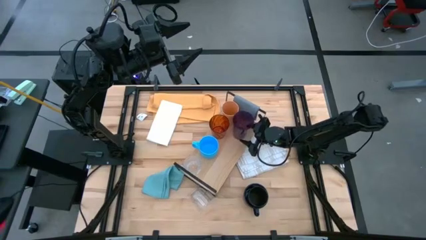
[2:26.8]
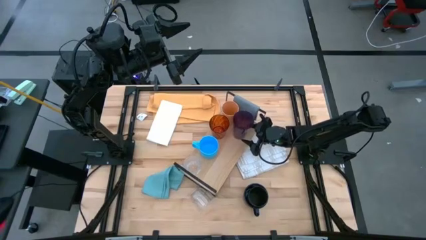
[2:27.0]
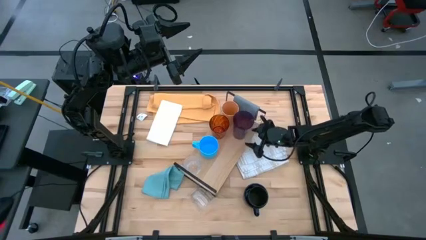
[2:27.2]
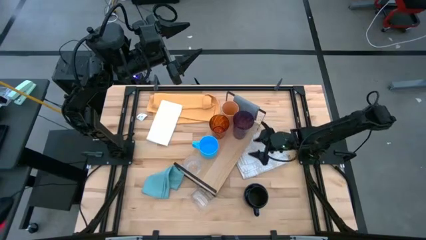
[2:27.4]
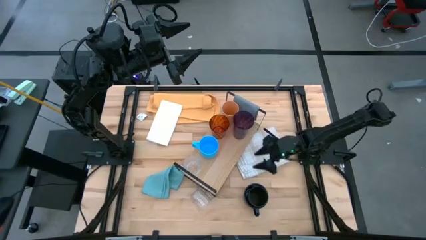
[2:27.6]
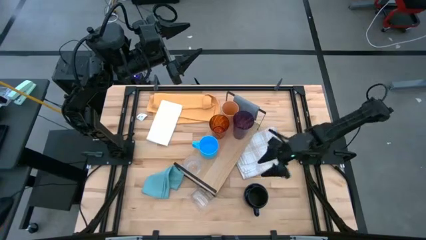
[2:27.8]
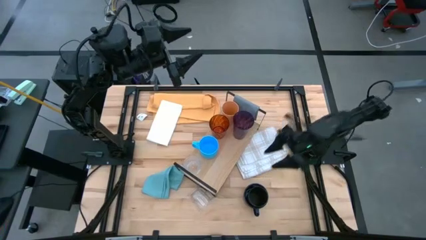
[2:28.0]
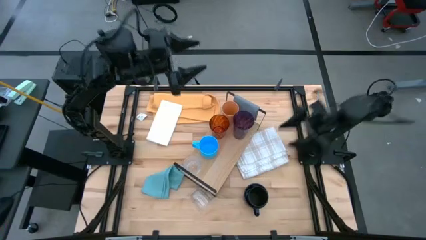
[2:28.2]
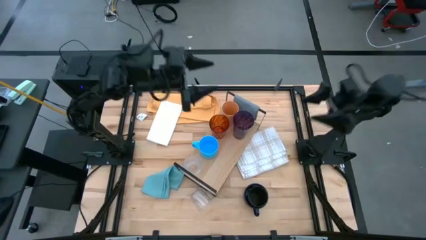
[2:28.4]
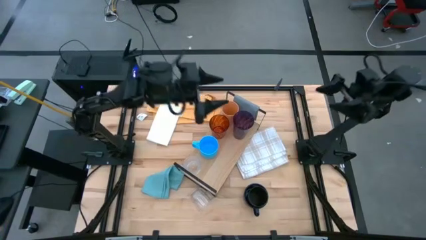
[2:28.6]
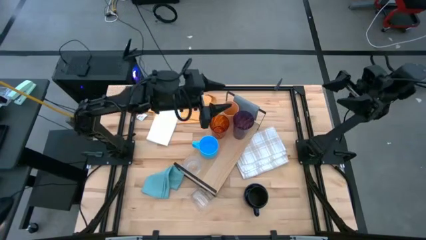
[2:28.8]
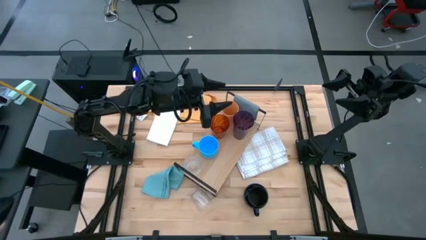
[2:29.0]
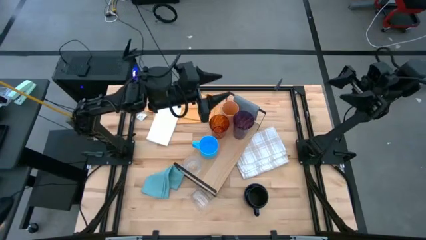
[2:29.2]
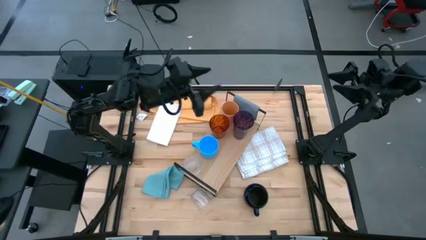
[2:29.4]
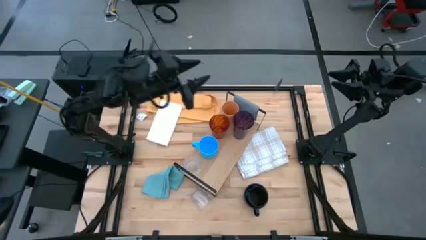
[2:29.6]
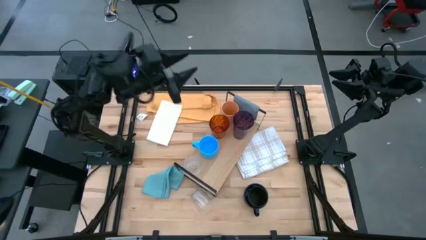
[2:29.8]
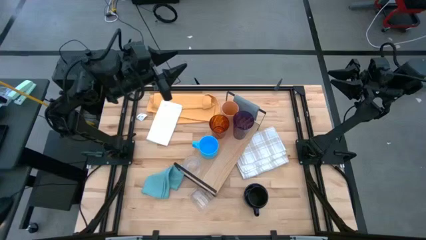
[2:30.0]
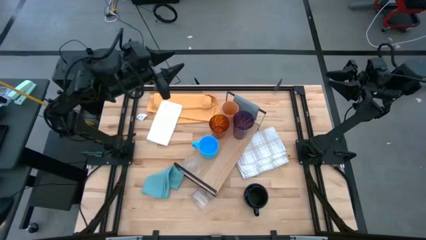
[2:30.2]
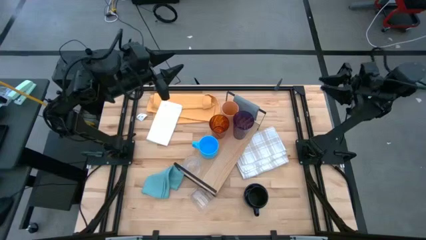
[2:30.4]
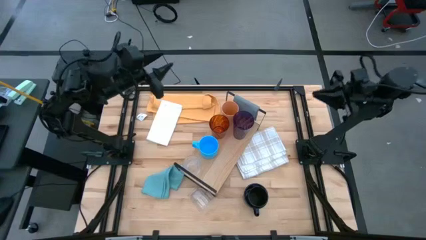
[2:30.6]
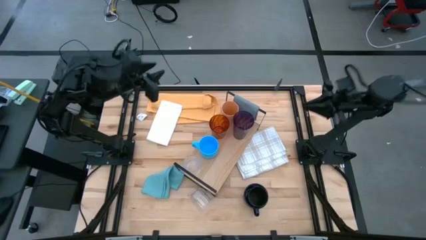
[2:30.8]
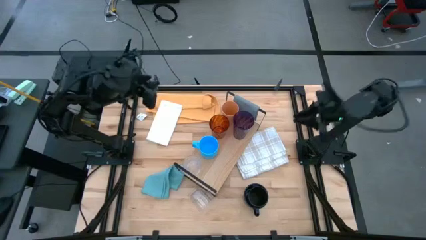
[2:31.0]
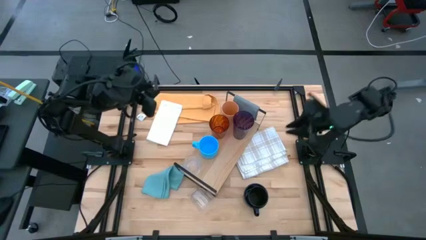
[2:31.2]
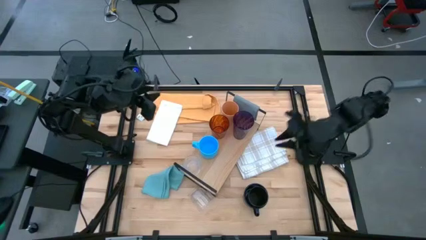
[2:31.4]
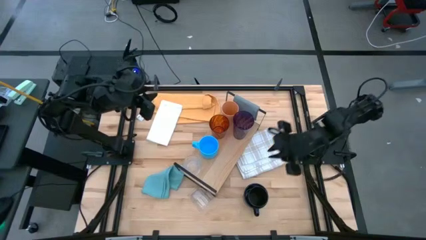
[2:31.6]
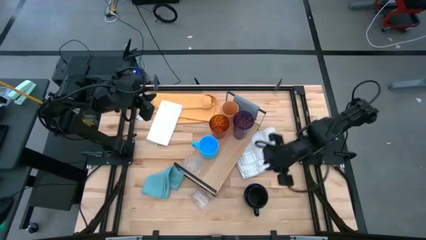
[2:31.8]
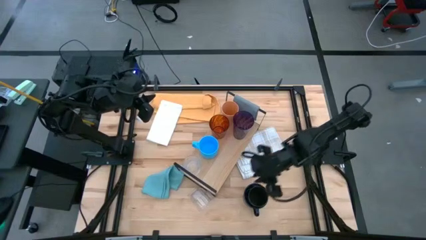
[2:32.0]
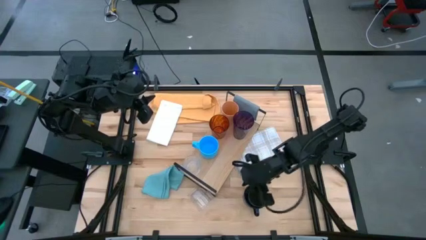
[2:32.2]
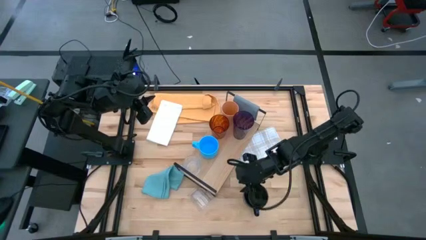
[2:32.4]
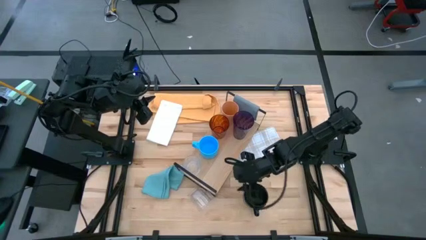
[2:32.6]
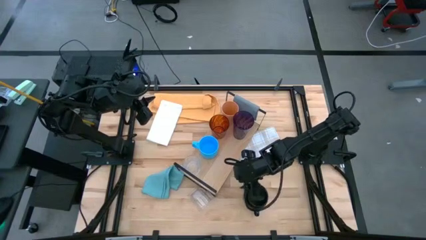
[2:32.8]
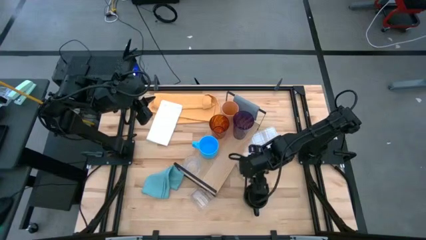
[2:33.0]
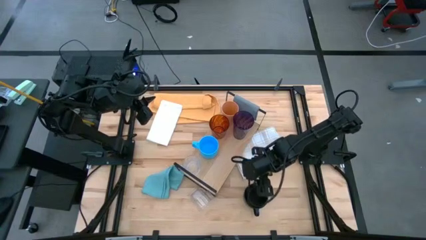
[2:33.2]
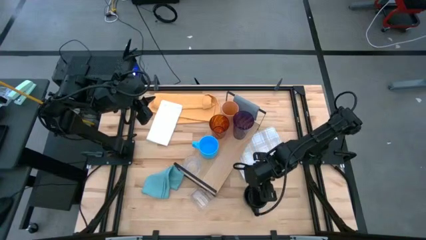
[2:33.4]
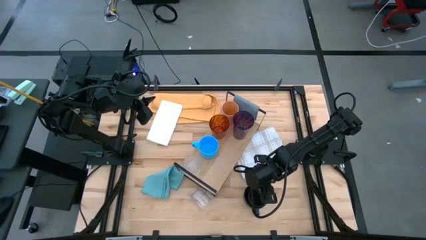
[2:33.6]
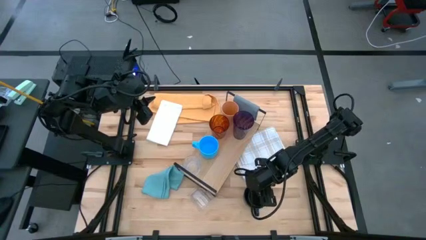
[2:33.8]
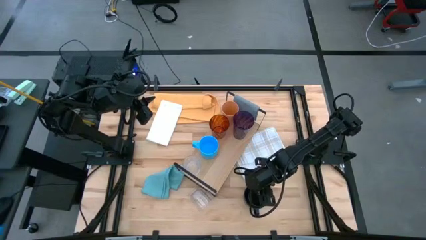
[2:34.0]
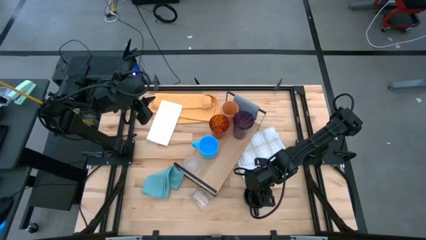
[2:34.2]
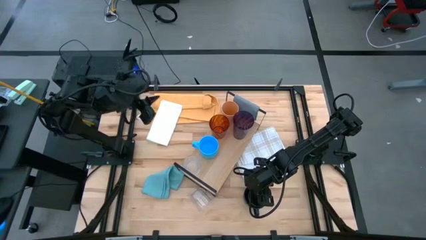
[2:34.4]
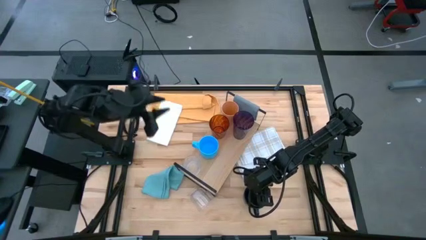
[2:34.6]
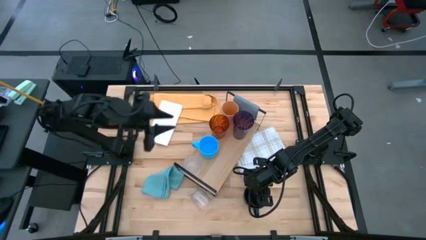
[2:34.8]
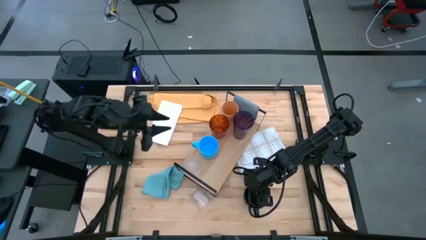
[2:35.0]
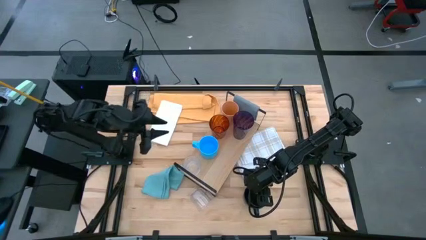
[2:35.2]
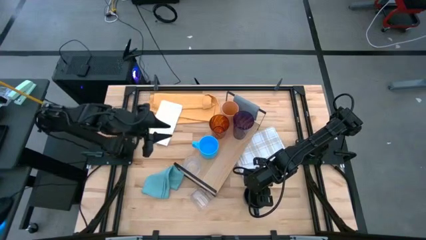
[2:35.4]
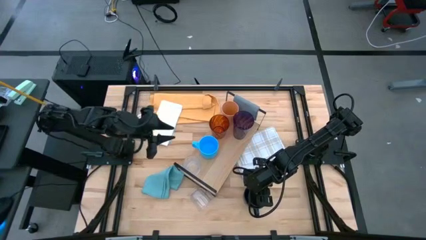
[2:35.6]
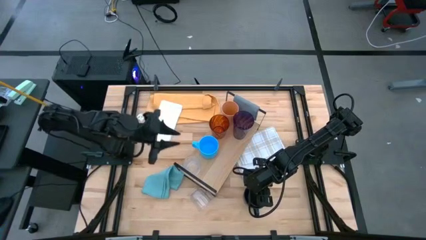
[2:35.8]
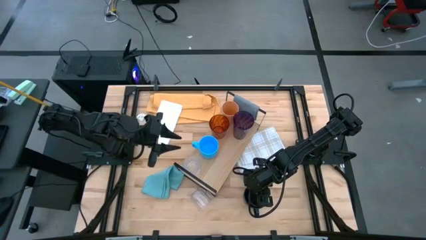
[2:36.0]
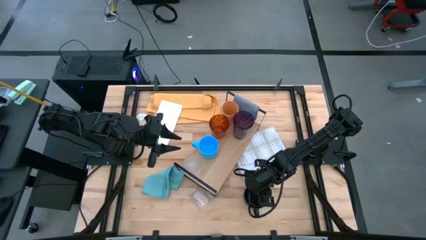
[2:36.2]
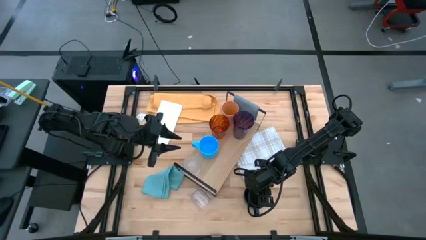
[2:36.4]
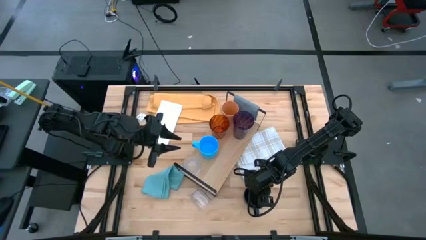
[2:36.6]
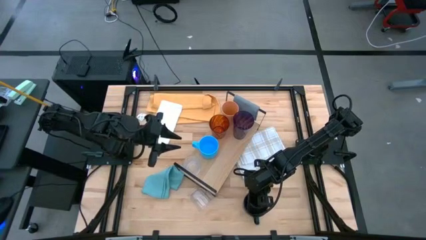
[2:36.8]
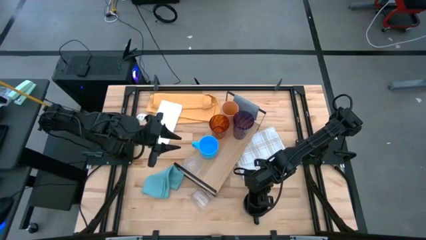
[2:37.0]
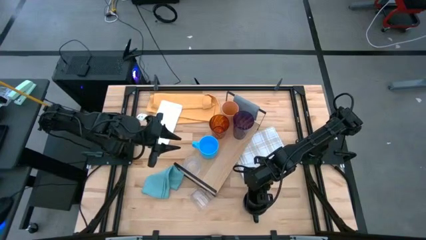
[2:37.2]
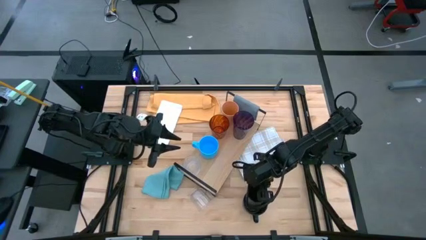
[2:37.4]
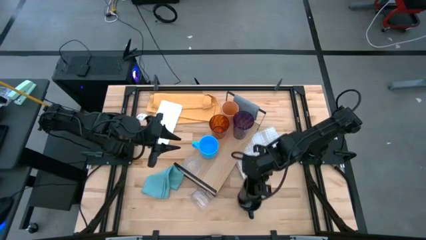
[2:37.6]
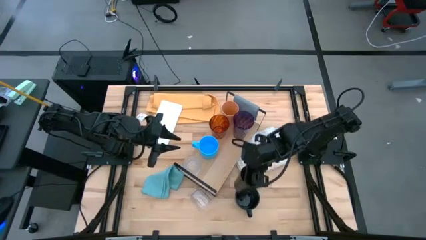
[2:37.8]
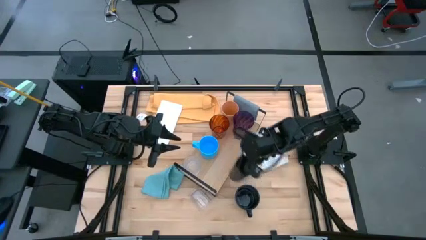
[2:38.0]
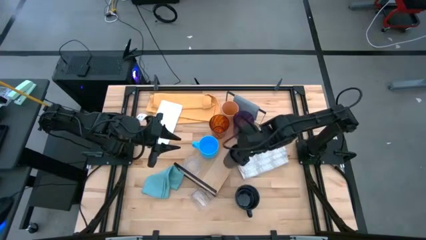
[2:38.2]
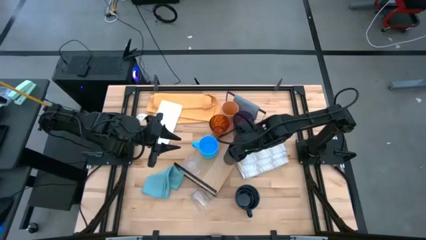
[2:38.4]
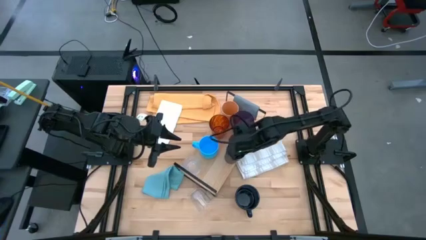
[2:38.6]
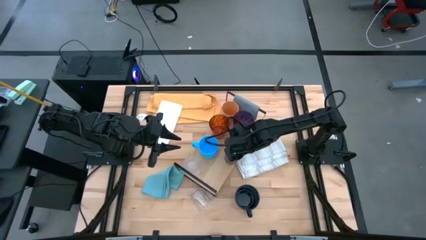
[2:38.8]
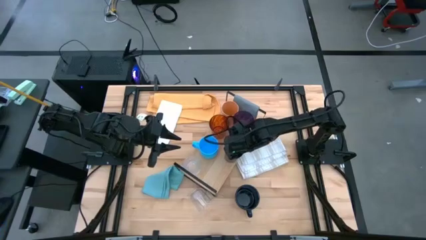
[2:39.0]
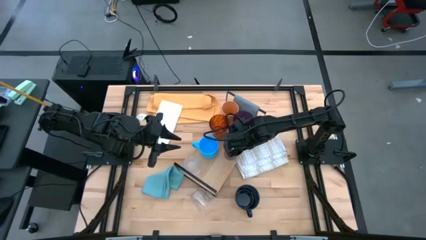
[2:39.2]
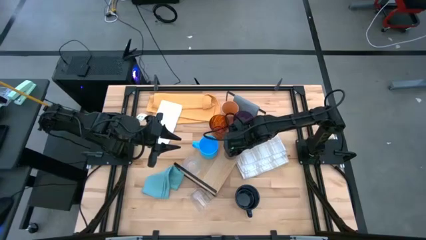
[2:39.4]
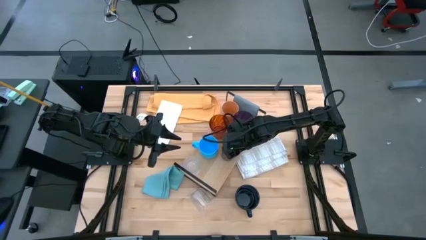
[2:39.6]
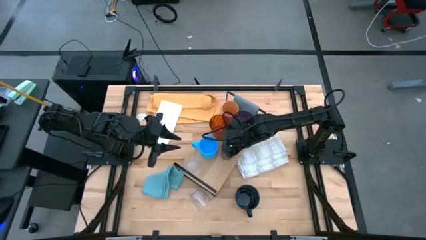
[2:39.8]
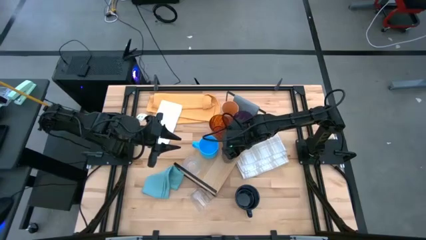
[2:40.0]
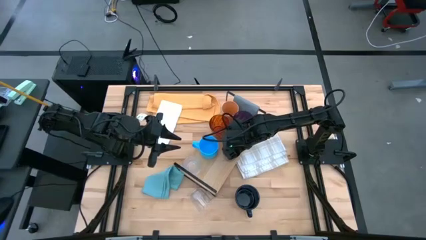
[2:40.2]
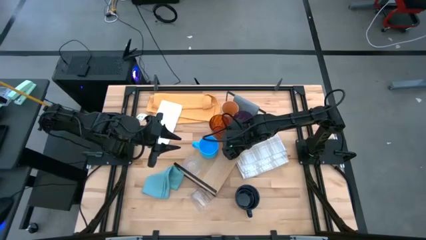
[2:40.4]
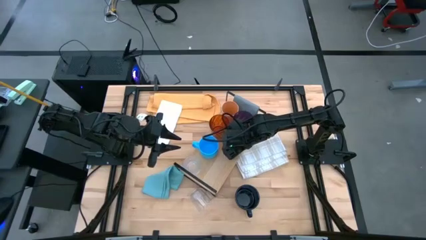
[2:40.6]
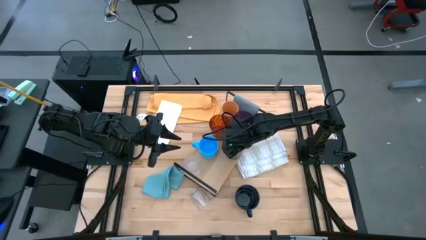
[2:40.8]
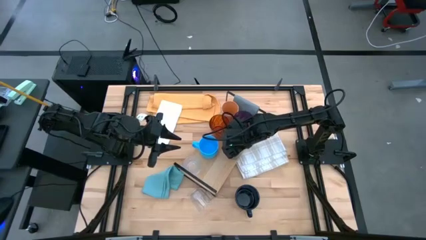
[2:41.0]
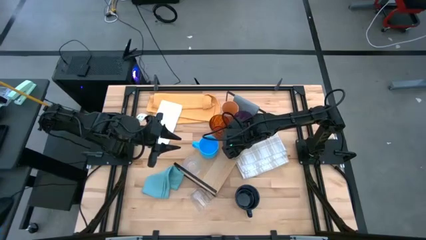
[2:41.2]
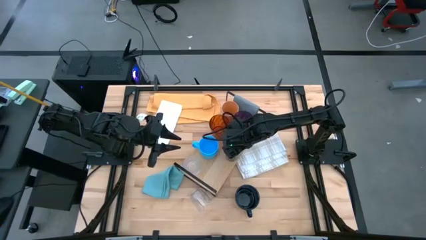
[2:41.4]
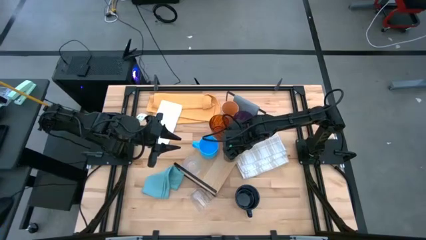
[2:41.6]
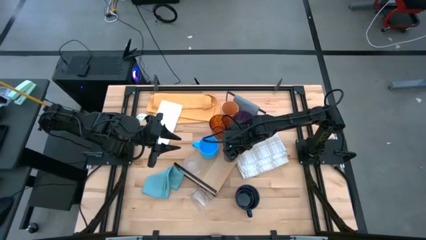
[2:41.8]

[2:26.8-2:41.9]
Task: Stack small to large cups/mugs on shelf
Put the black cup on the shelf
